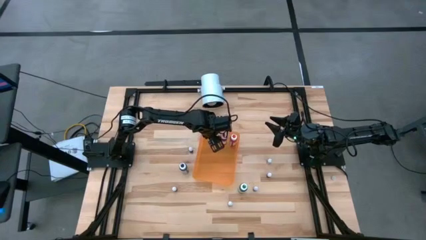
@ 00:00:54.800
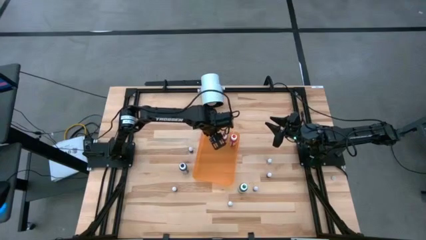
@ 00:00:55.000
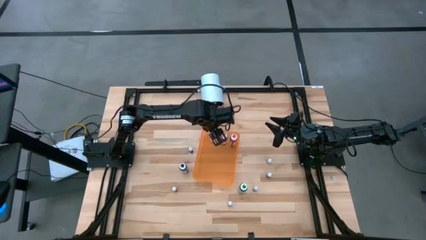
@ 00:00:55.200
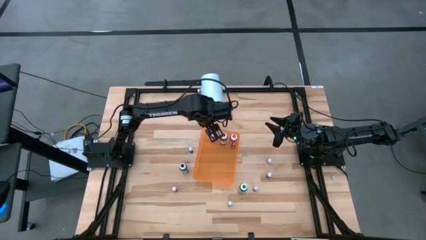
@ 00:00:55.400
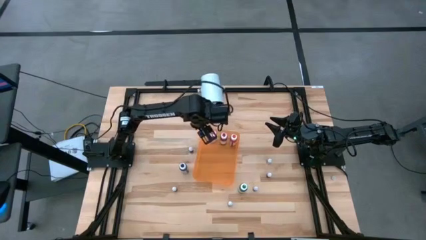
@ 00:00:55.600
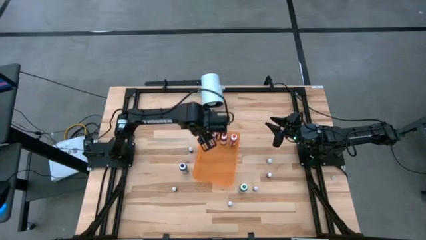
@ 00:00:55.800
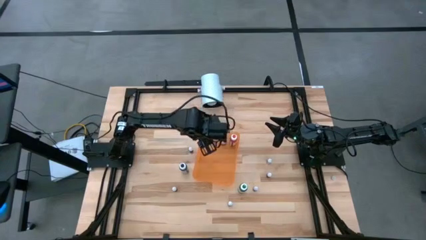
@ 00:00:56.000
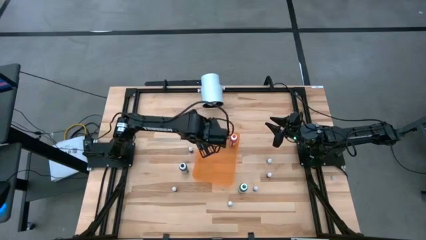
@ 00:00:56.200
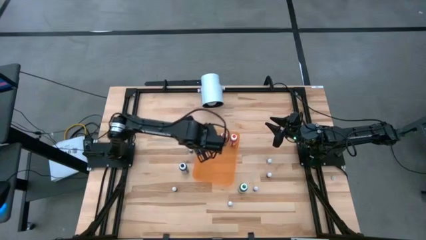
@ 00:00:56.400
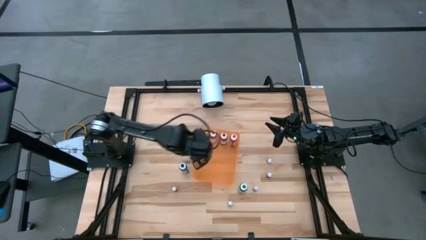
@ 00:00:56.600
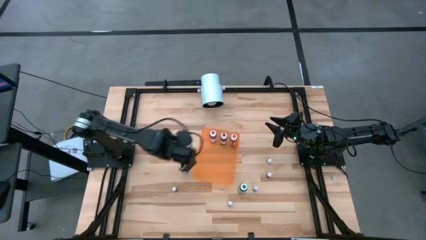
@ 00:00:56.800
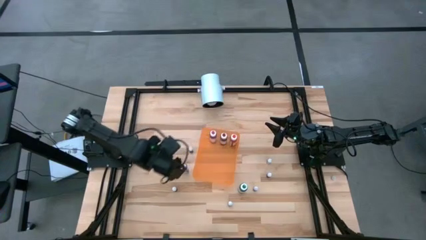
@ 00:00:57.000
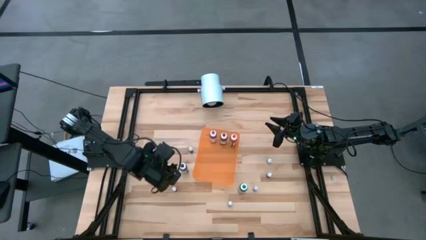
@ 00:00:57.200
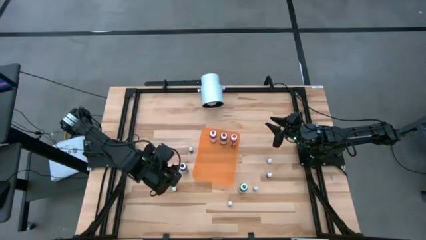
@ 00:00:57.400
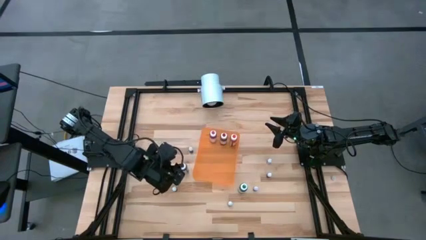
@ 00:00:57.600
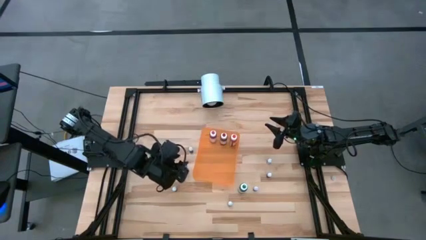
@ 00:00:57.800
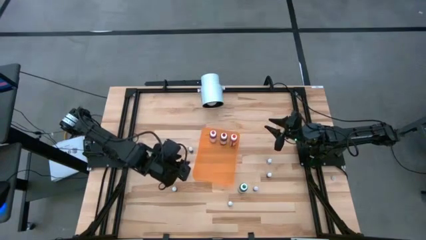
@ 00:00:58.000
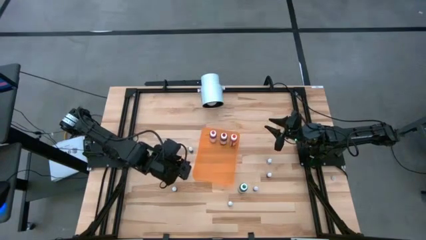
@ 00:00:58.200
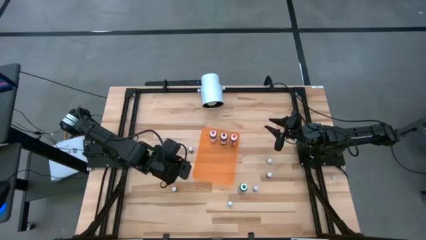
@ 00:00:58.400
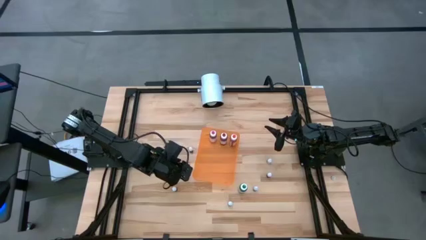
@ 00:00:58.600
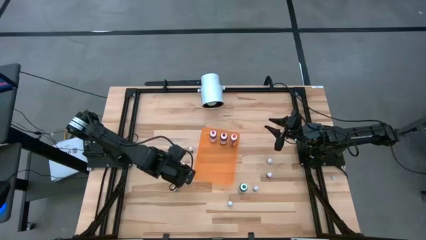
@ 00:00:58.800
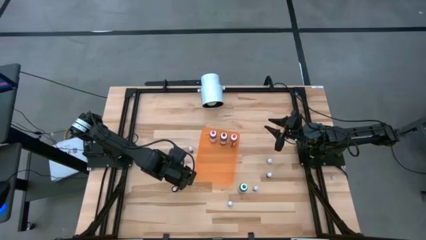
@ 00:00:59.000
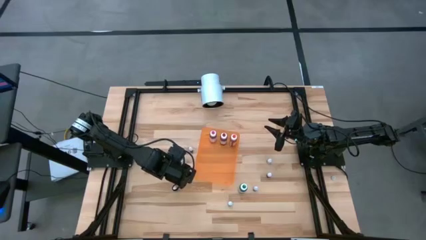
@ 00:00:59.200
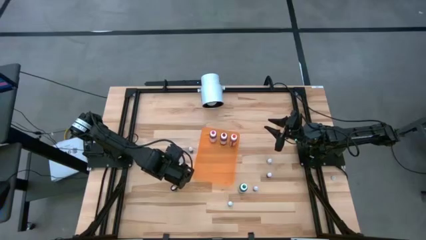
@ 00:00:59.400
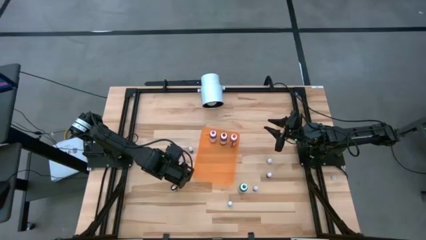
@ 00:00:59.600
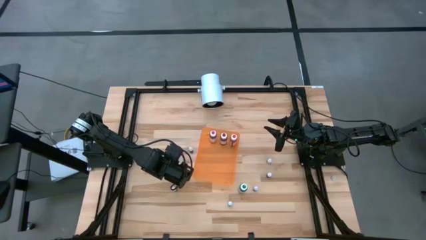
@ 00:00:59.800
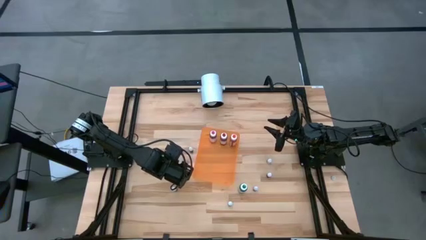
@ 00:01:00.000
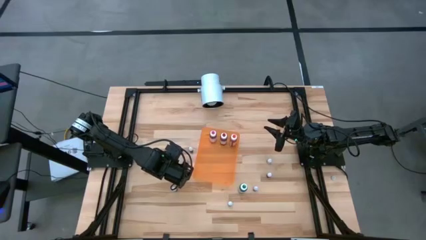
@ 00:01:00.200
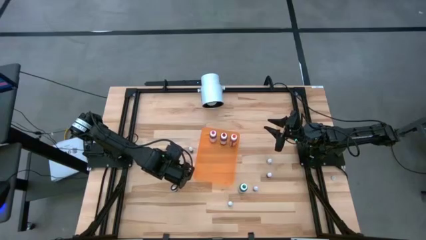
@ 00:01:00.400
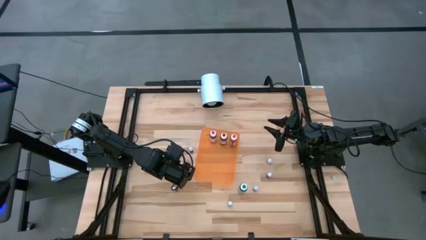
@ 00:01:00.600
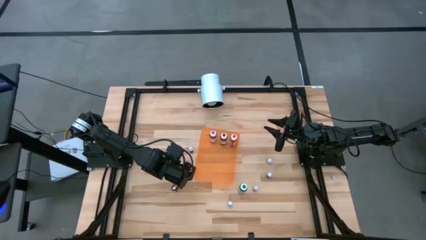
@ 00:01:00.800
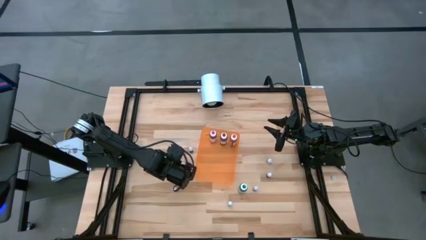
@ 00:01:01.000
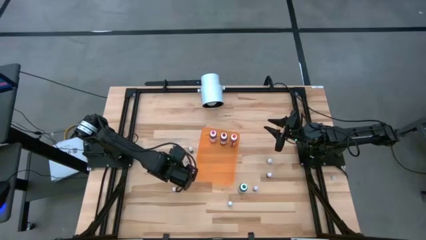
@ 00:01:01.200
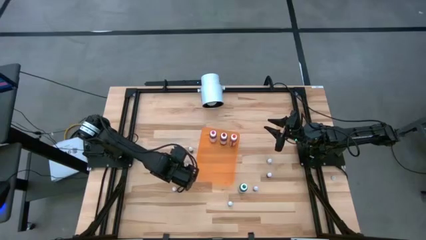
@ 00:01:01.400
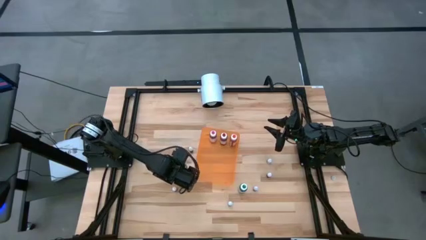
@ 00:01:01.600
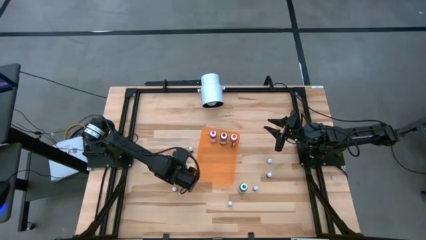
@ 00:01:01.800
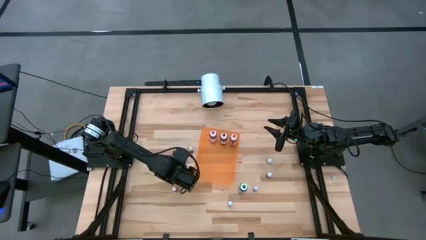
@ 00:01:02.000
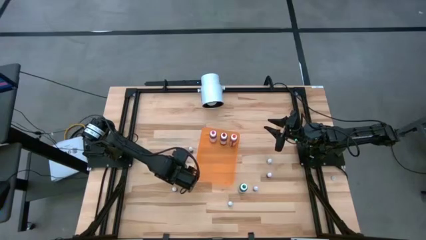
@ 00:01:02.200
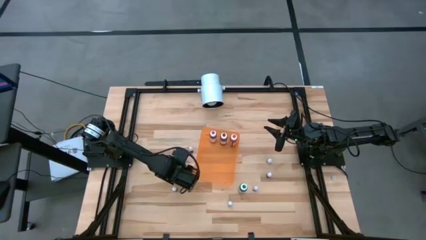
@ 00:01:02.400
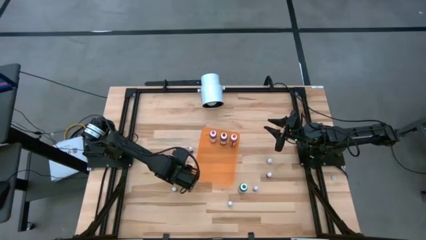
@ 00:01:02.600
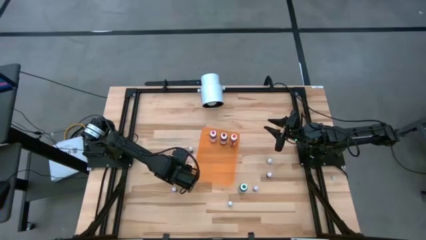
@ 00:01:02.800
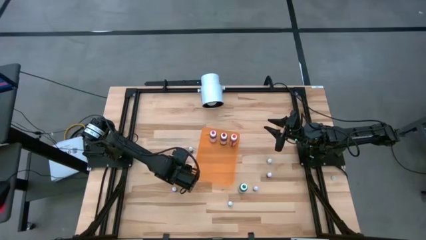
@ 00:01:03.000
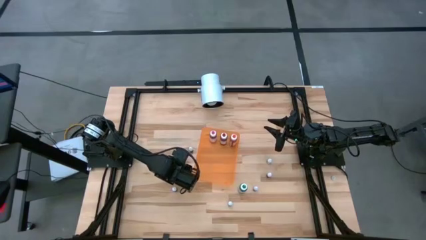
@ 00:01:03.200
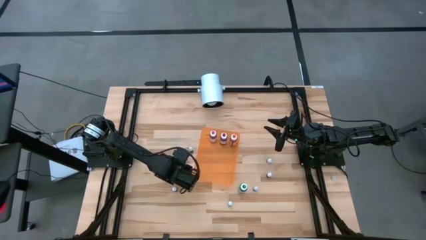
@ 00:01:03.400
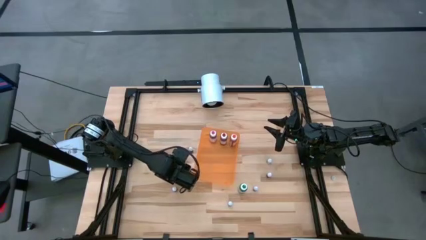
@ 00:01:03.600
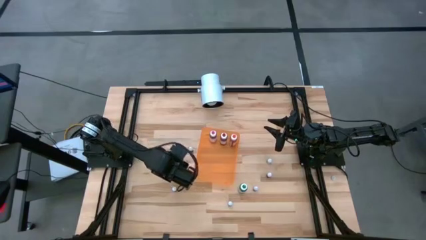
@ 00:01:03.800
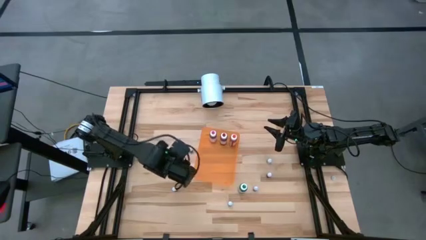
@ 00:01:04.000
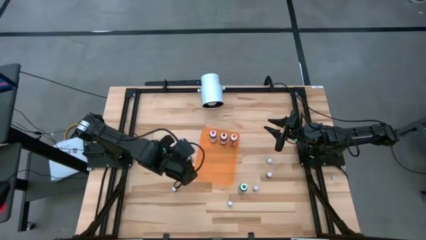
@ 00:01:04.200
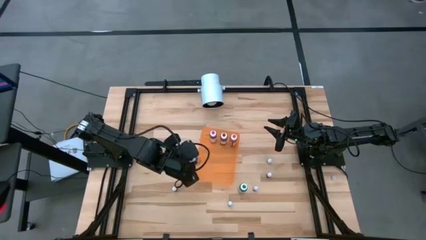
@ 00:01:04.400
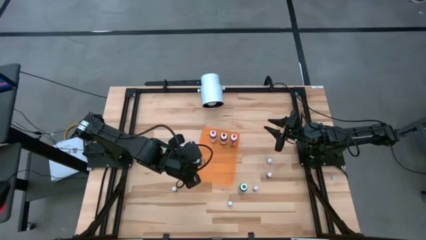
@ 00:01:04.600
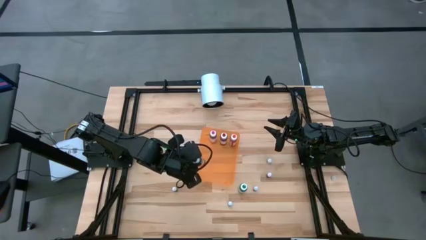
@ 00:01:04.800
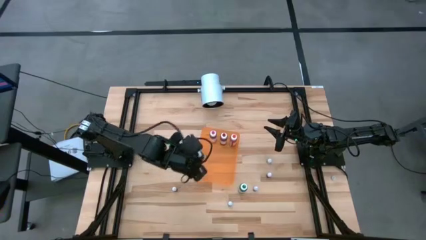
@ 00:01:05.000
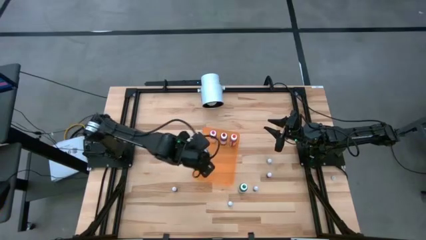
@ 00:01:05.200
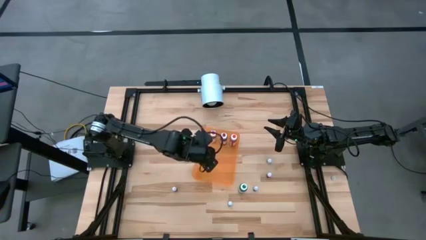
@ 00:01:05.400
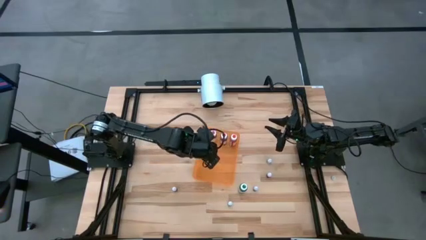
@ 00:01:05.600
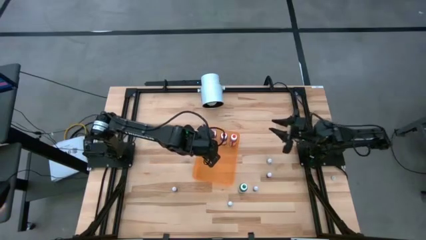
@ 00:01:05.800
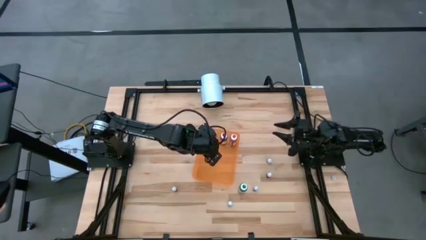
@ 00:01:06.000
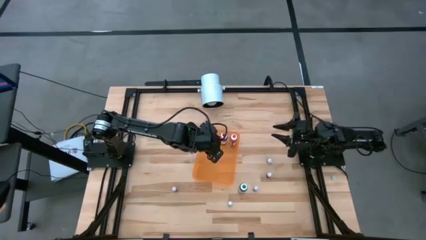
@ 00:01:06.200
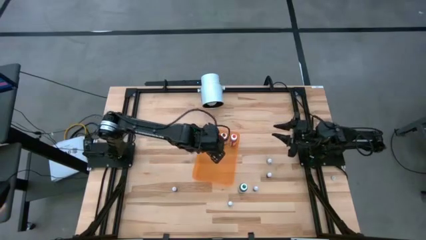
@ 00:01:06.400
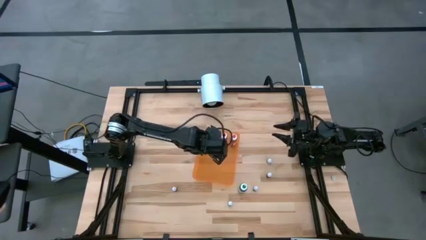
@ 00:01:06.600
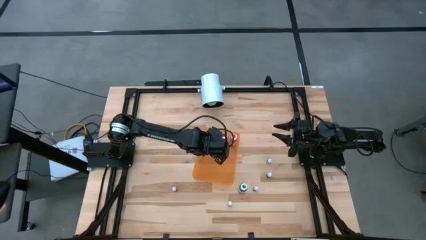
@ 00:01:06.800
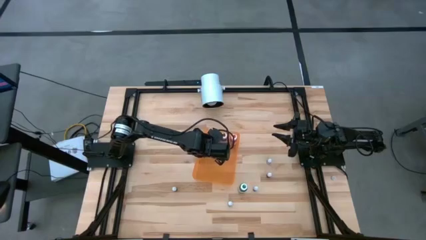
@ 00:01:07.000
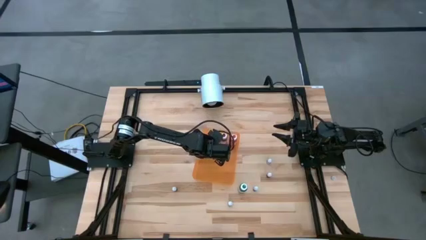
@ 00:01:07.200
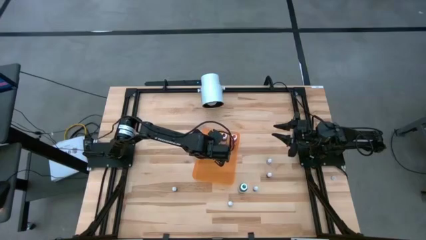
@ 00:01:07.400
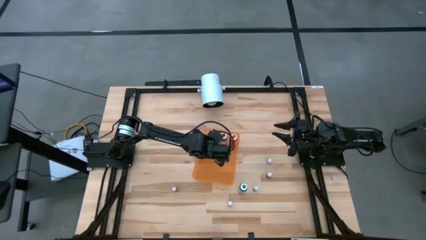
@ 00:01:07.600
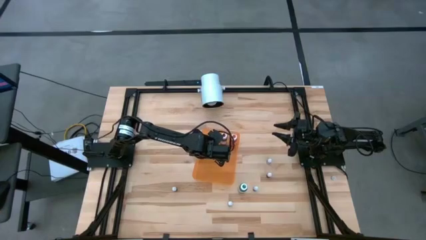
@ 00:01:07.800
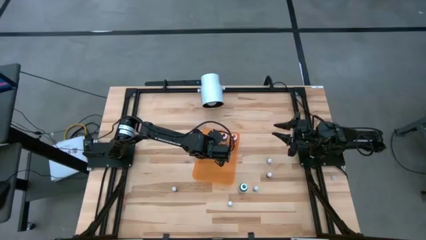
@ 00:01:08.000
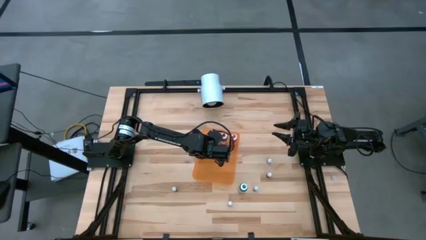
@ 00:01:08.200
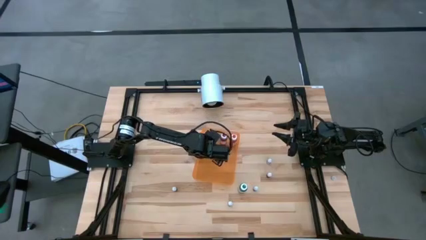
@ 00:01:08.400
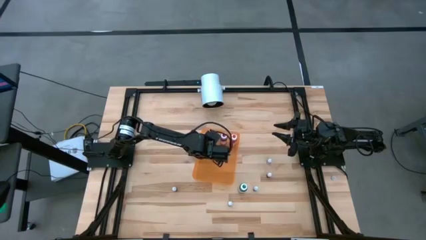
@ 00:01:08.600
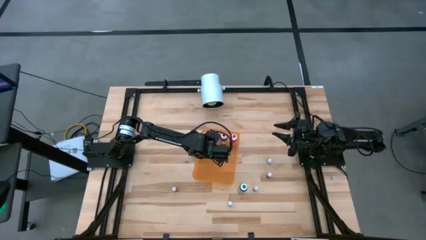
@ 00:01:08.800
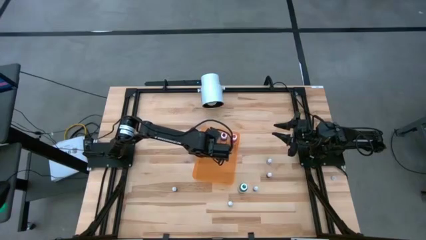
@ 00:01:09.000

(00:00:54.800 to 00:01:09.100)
Task: Pick & Place food coloring
Put the large black food coloring bottle into the orange bin
